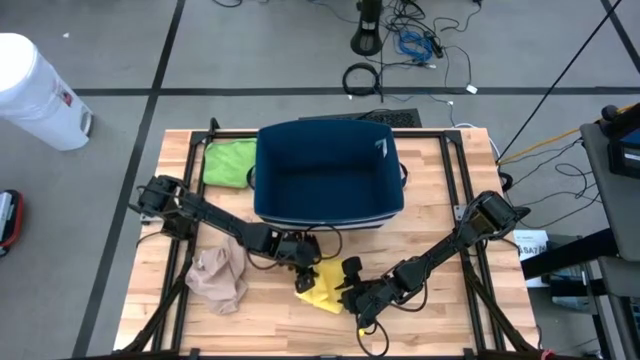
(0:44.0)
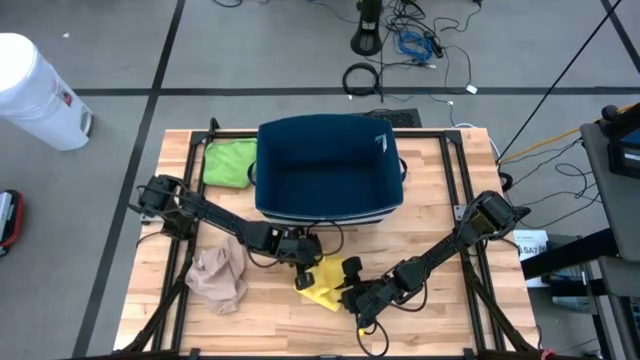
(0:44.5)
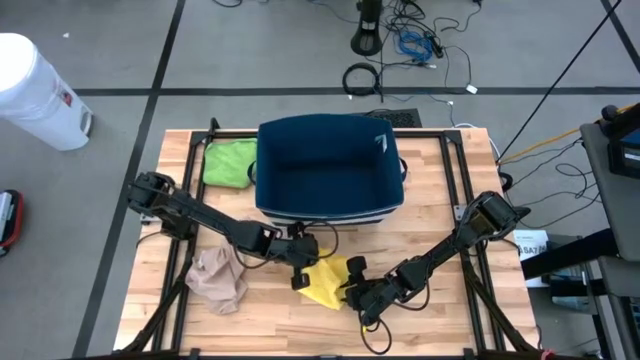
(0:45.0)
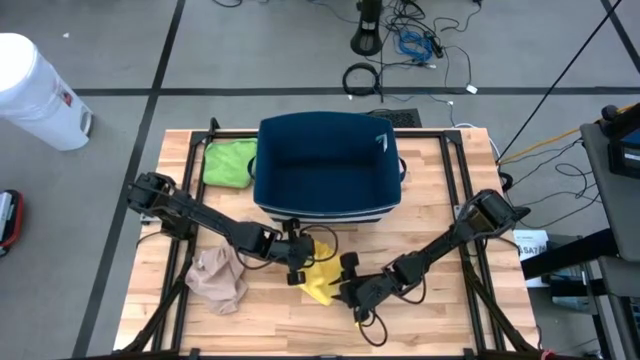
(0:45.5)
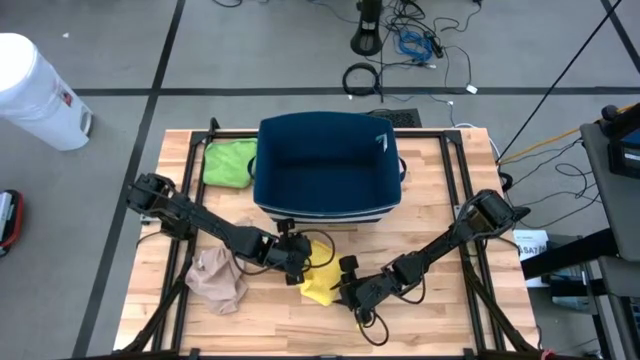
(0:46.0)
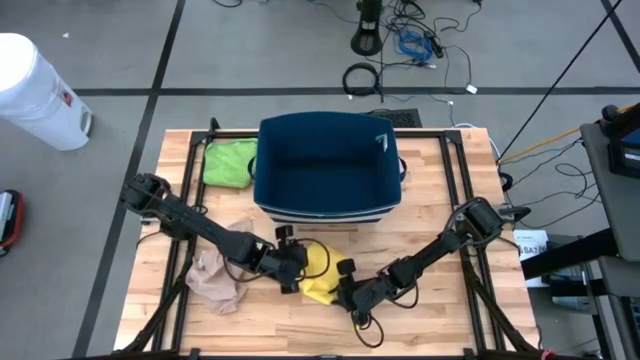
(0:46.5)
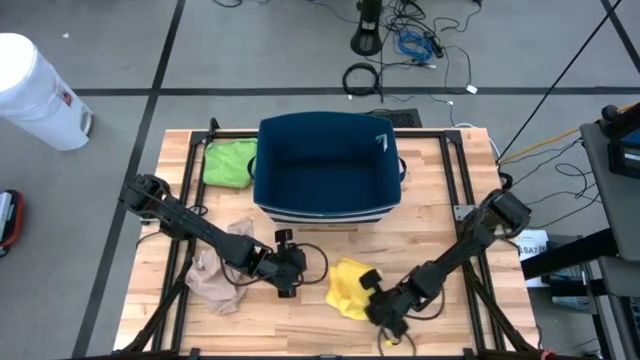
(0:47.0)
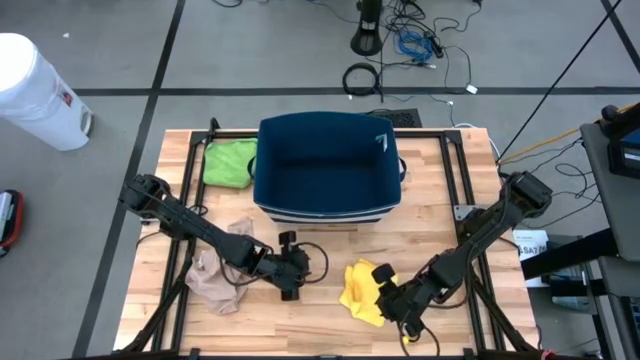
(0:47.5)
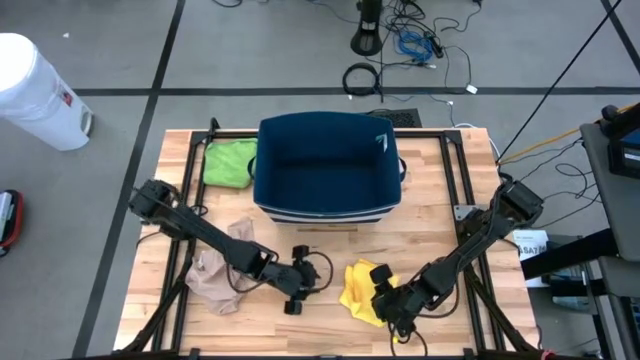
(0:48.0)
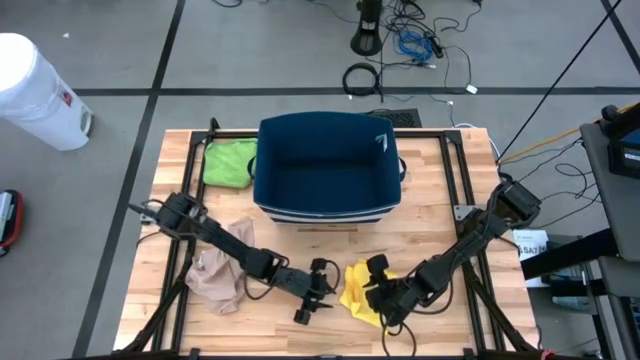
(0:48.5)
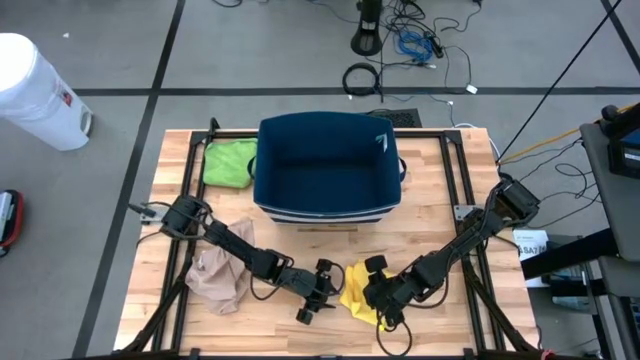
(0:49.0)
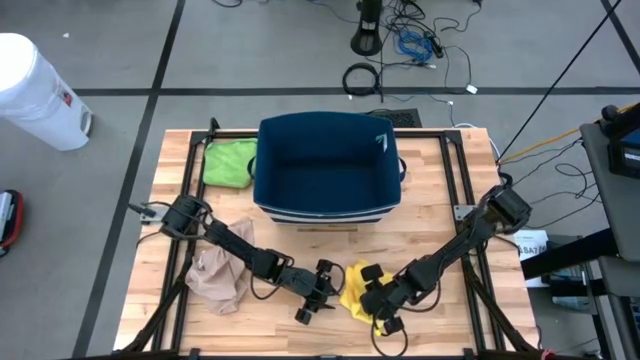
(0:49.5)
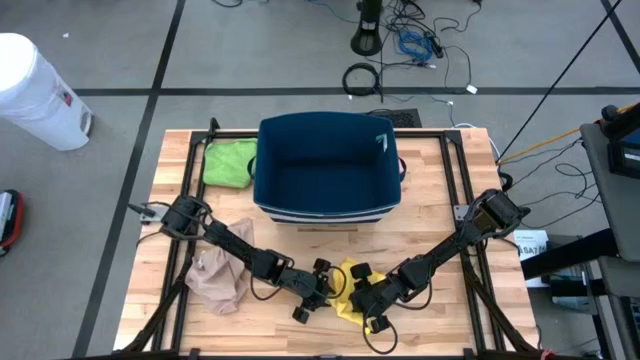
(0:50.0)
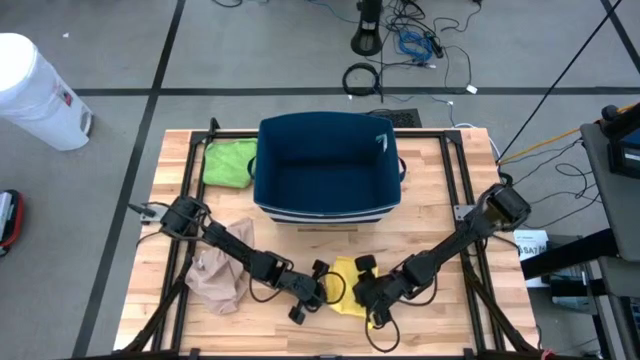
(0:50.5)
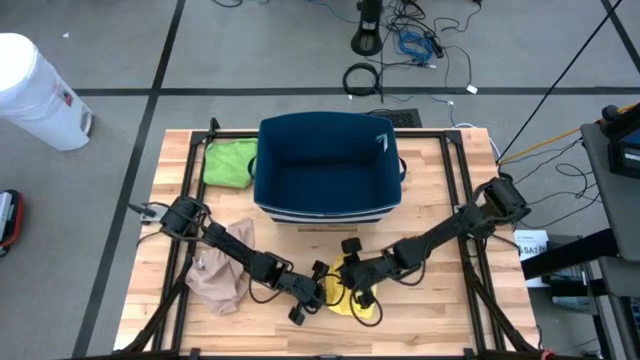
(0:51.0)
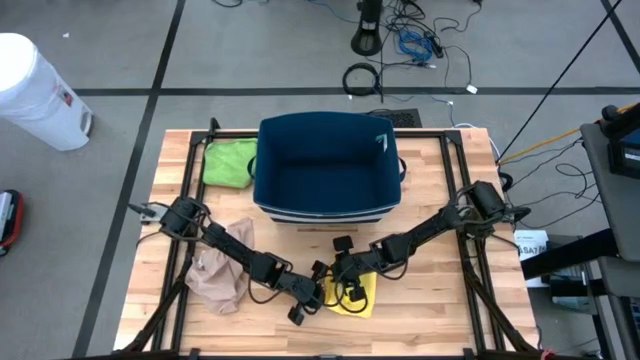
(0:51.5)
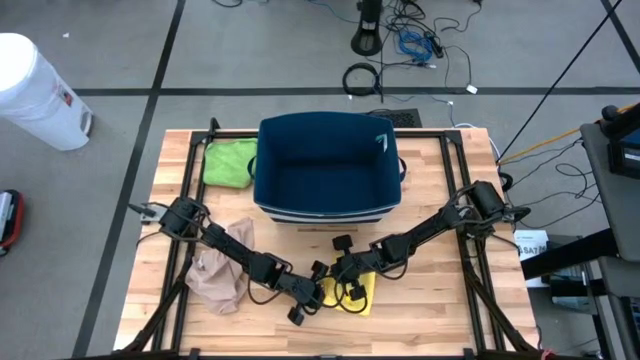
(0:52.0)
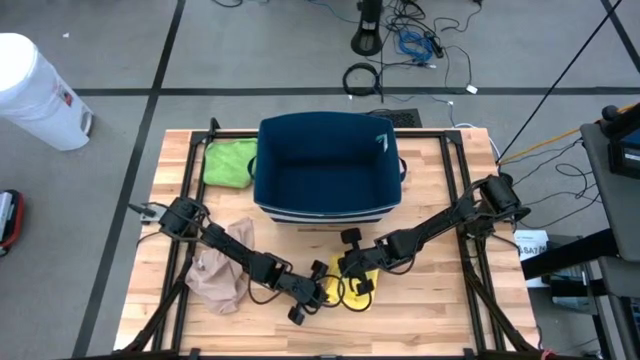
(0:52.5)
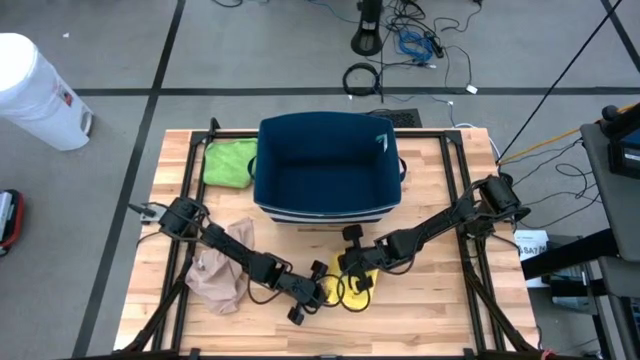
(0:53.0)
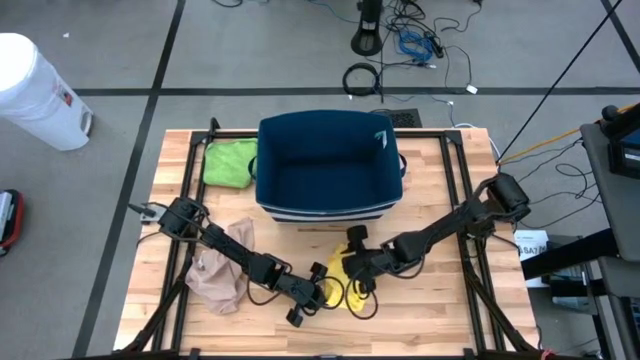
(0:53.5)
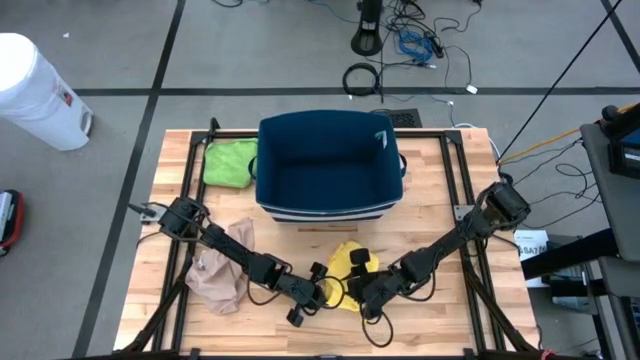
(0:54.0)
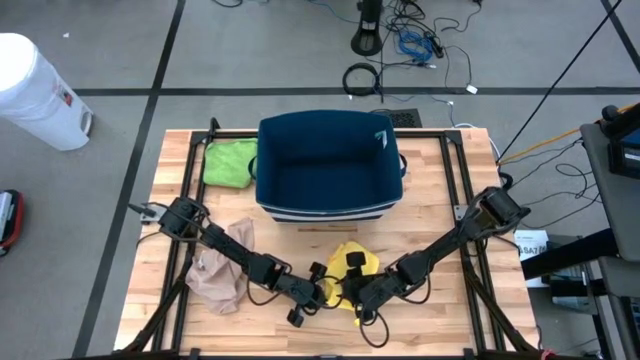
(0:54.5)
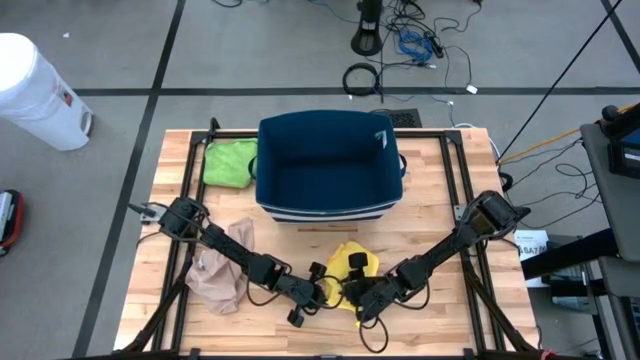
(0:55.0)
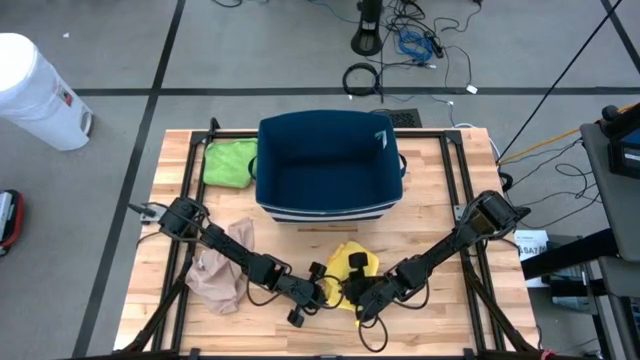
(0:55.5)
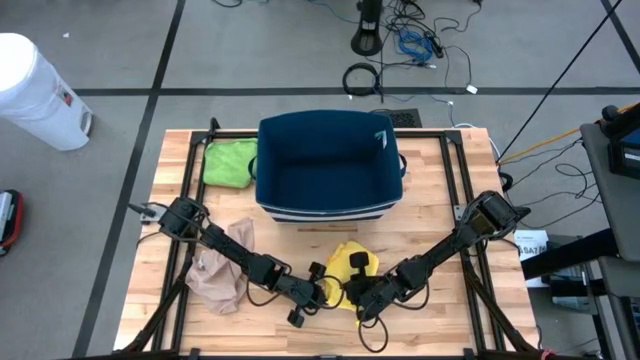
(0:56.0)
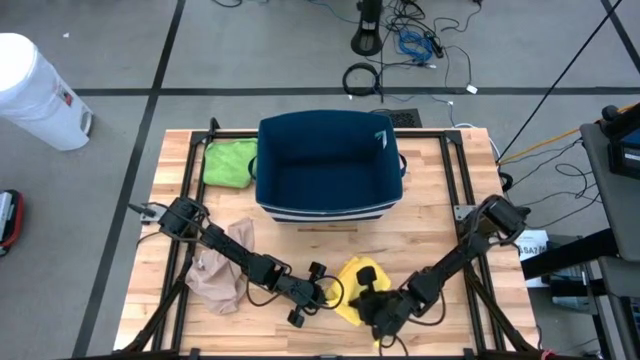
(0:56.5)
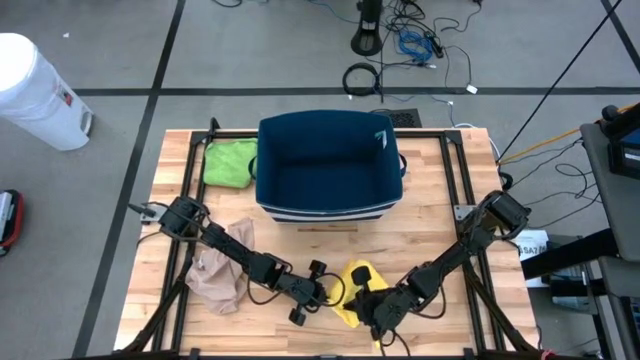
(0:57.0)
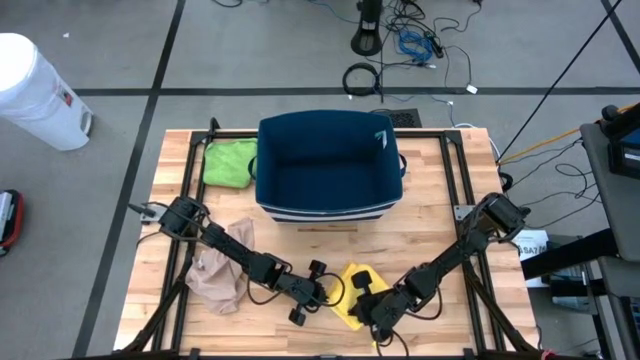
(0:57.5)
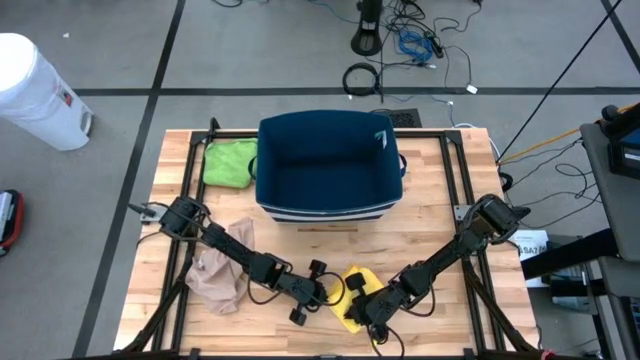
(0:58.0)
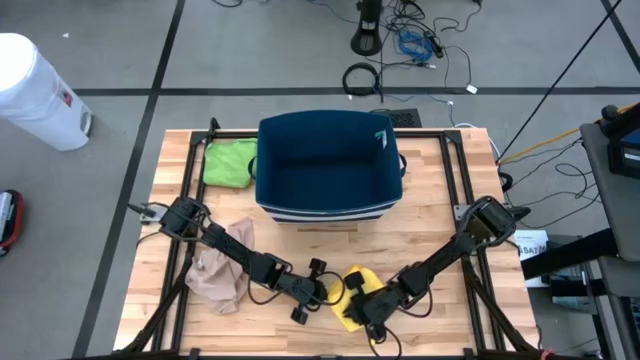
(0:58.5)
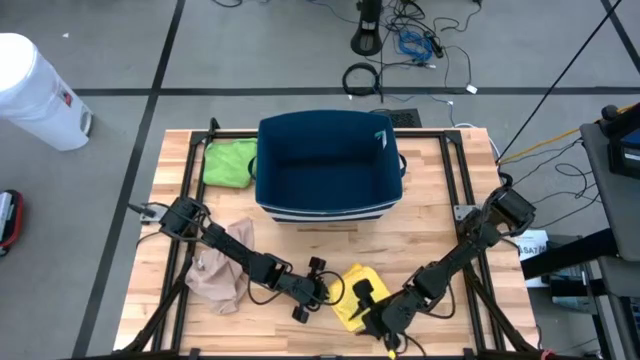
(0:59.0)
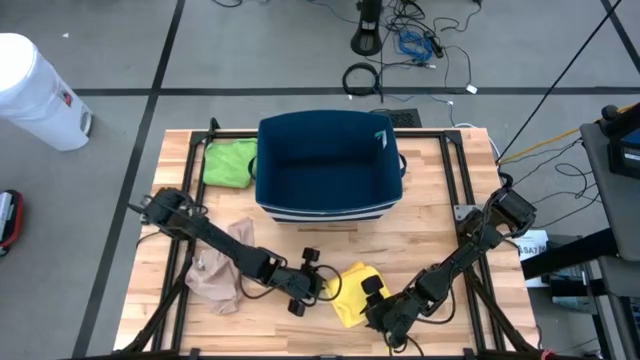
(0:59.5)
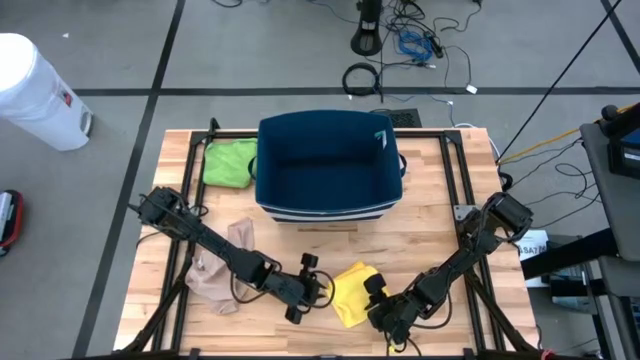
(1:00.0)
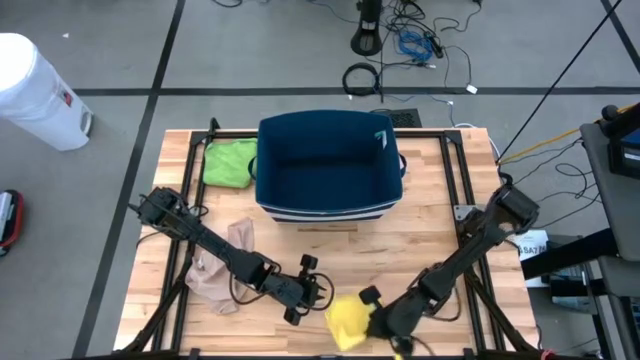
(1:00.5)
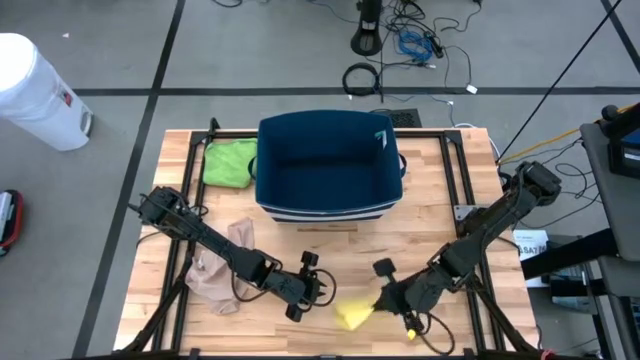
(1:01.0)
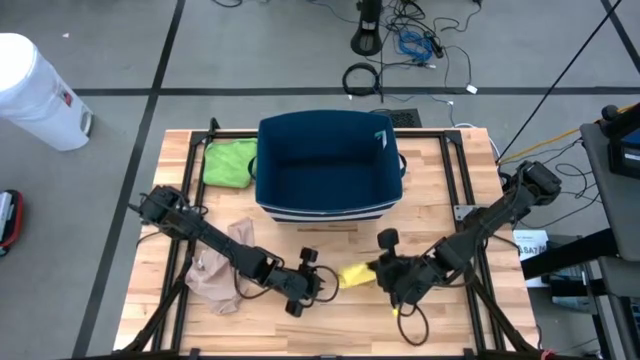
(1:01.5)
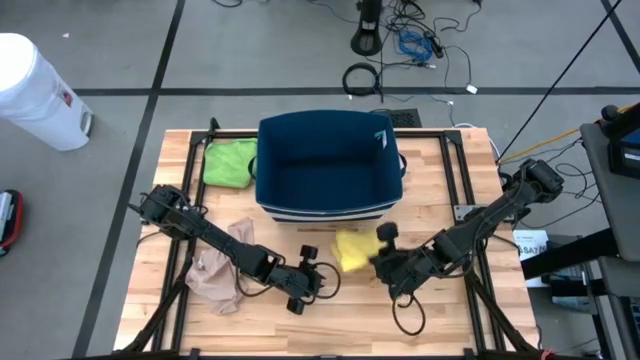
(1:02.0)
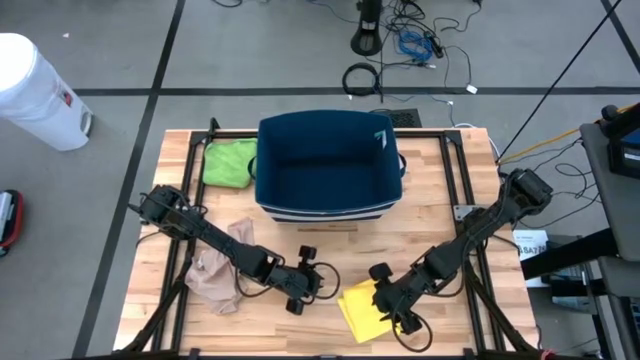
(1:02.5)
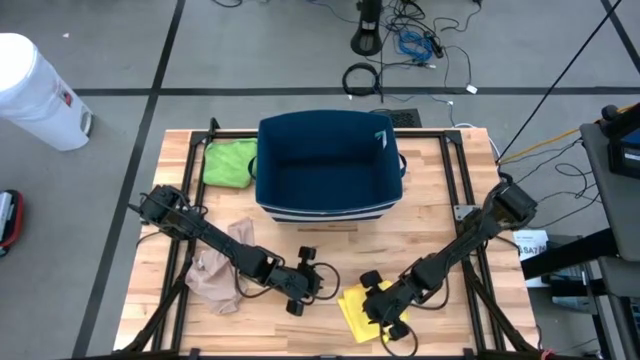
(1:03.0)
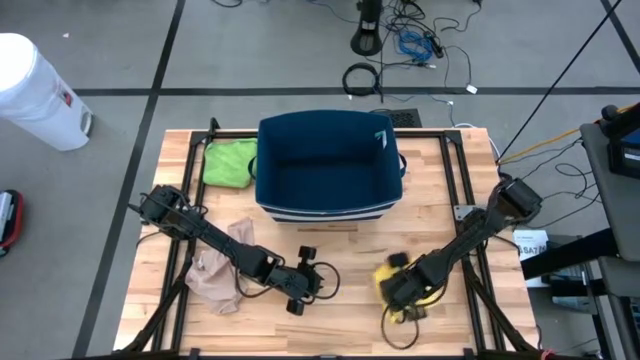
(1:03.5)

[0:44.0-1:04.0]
Task: Fold towel
Fold the yellow towel

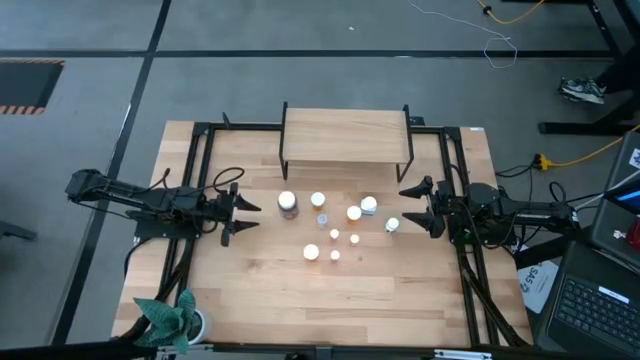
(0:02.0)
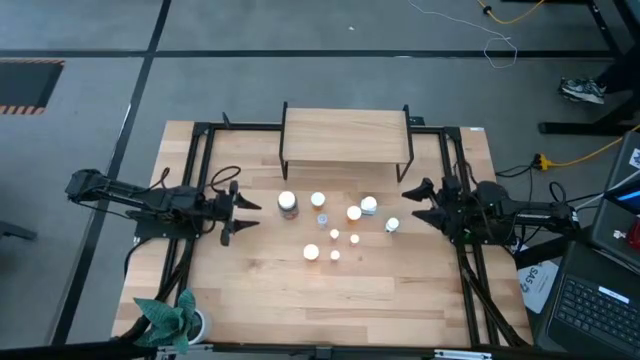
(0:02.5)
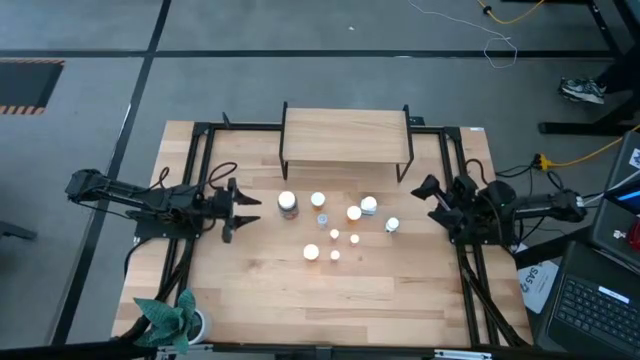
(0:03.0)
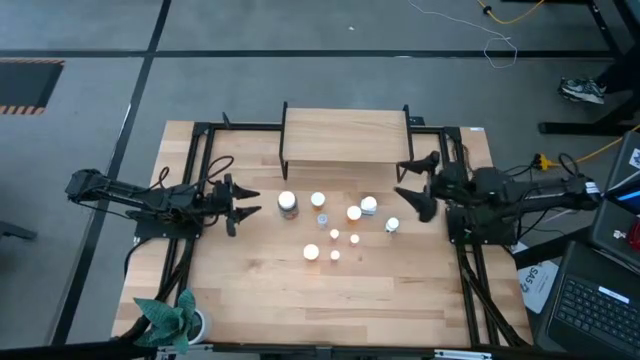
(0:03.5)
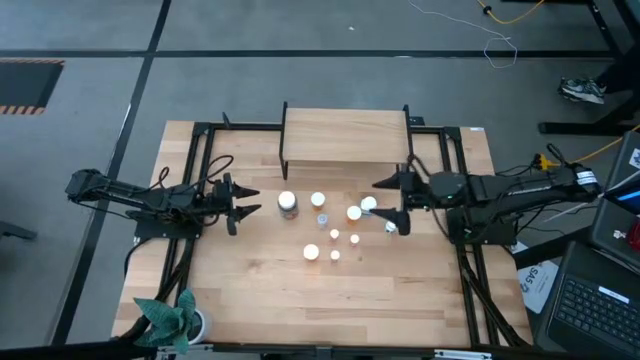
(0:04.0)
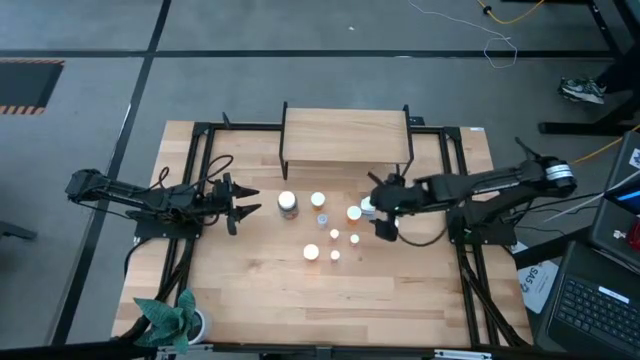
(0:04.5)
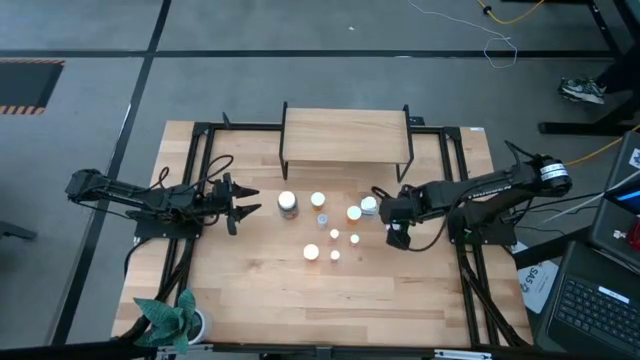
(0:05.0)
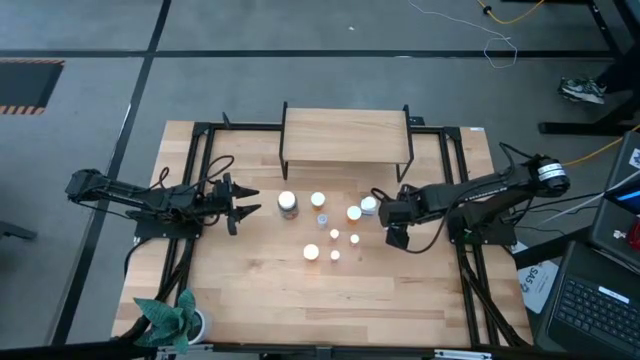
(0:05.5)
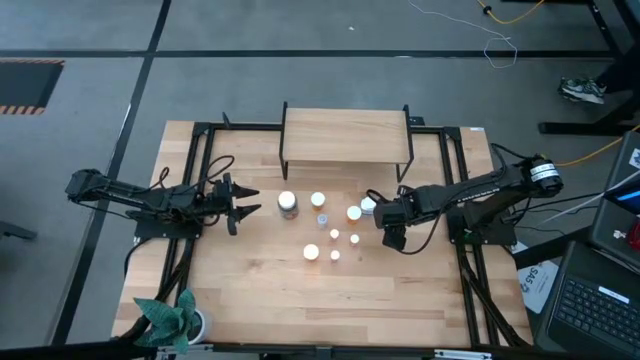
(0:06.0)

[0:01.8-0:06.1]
Task: Pick and place medicine bottles onto shelf by color
Put the bottom white pill bottle on the shelf
